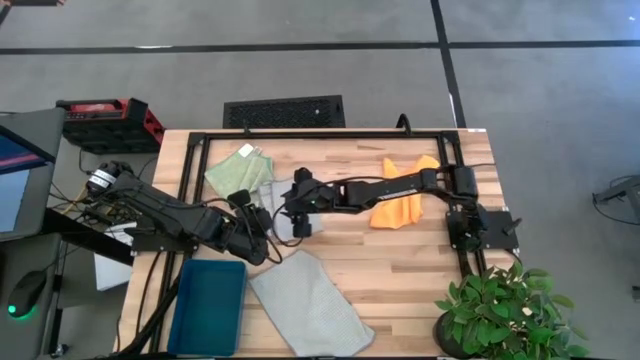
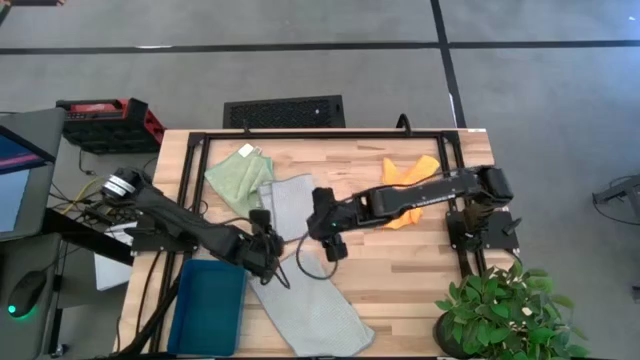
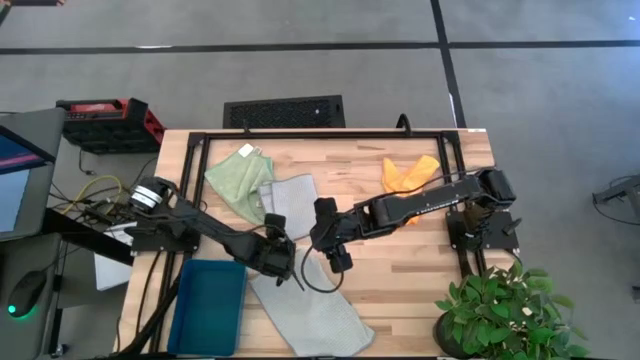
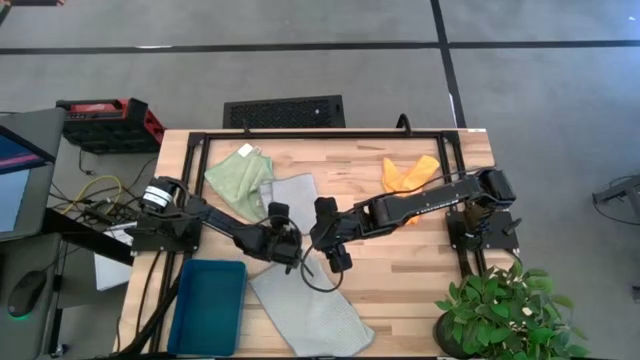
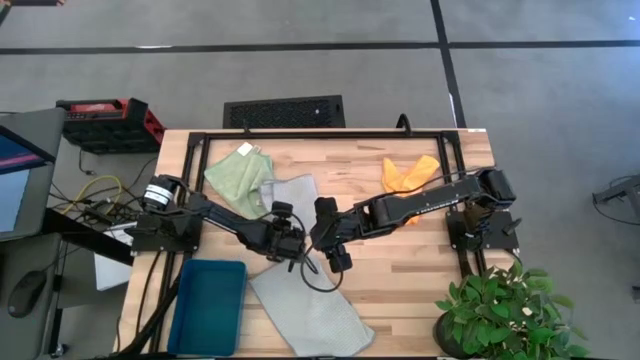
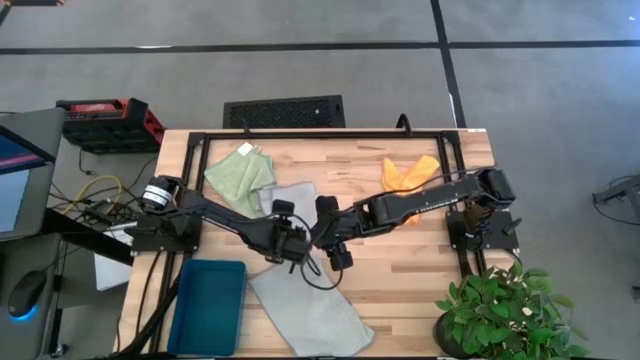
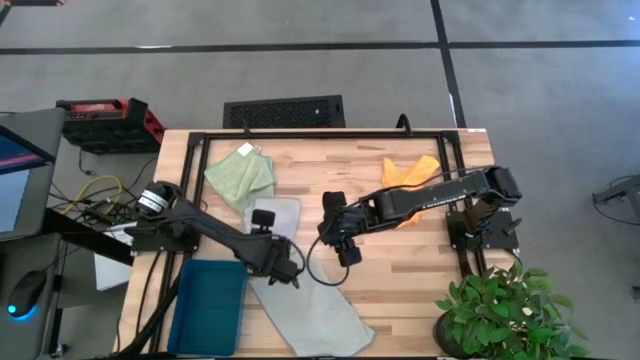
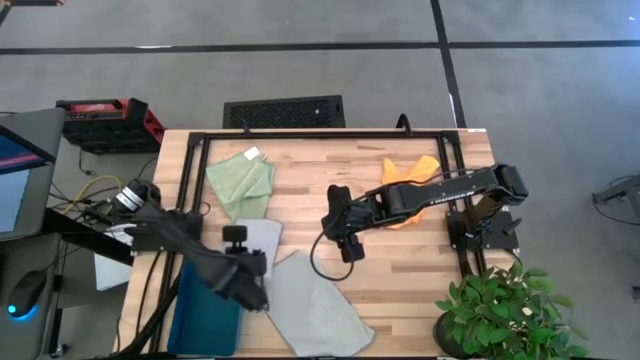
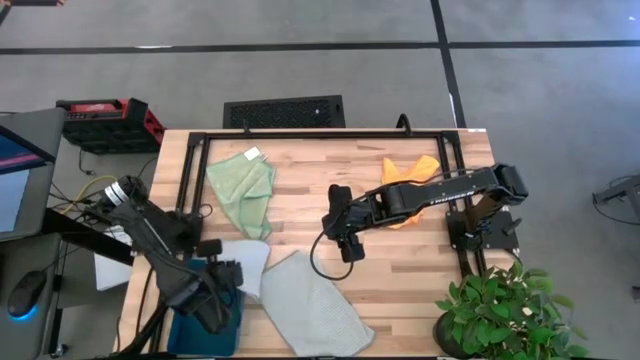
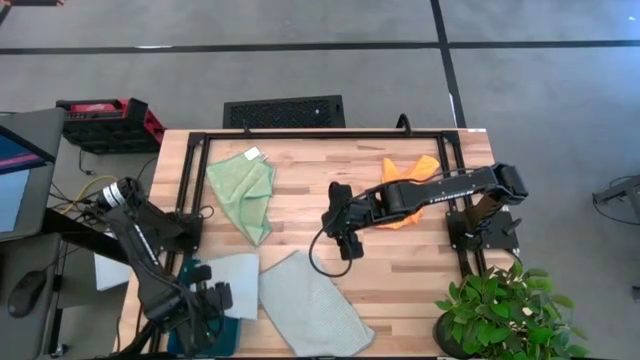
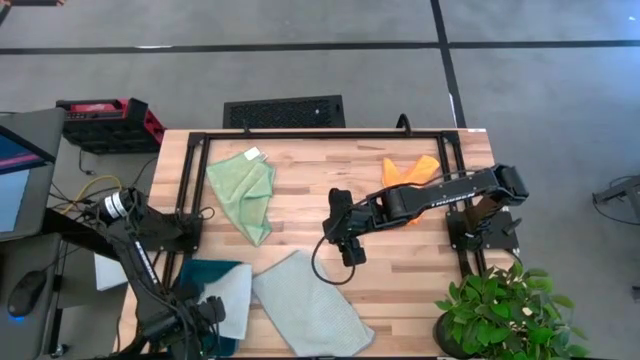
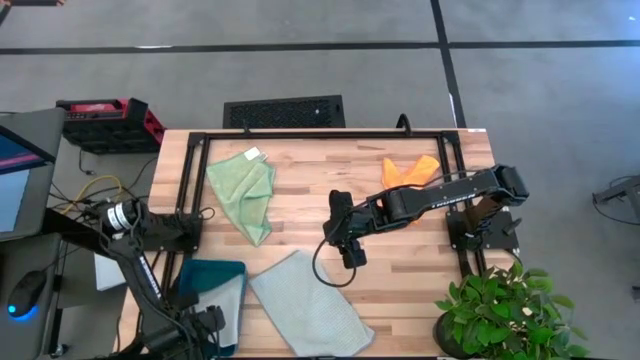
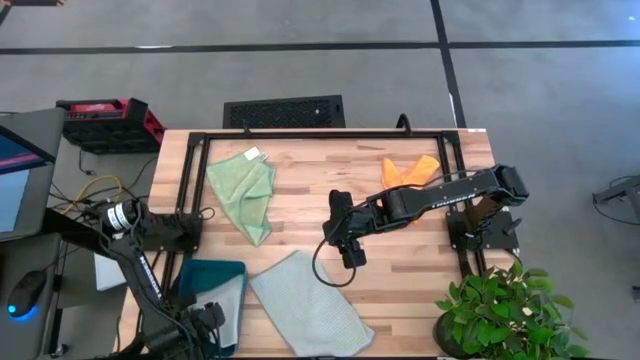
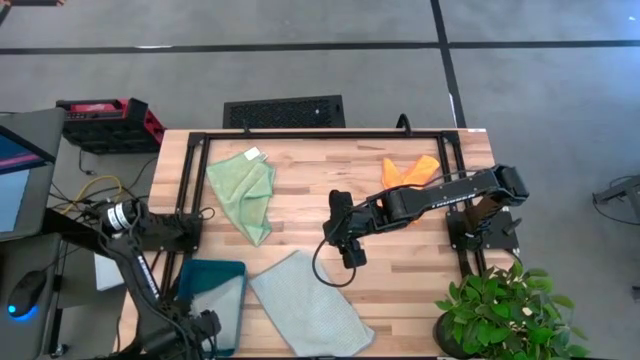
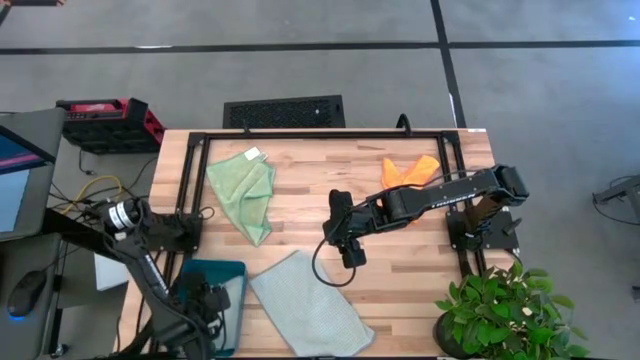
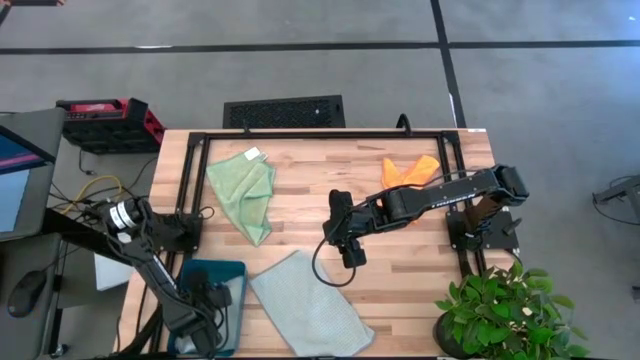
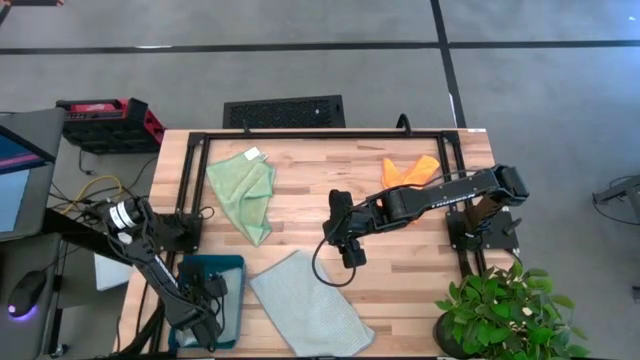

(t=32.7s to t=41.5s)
Task: Fold microfiber towels
Put the folded gray microfiber towel into the blue bin

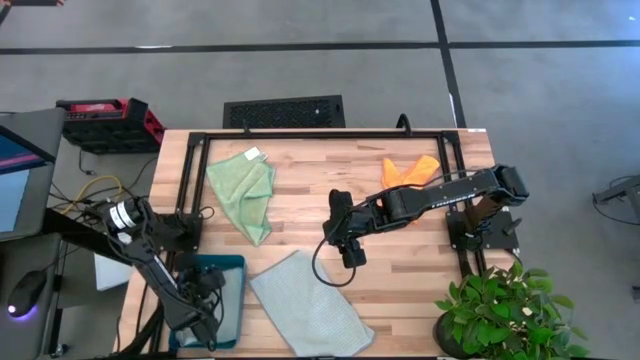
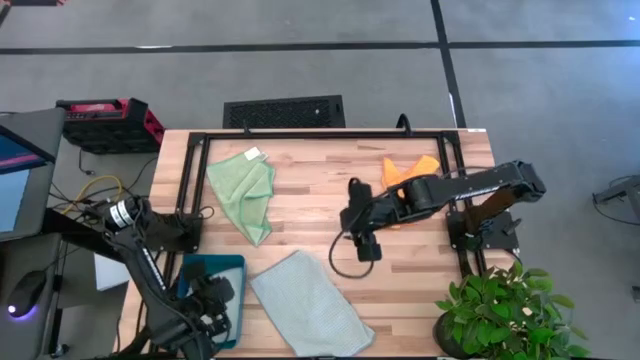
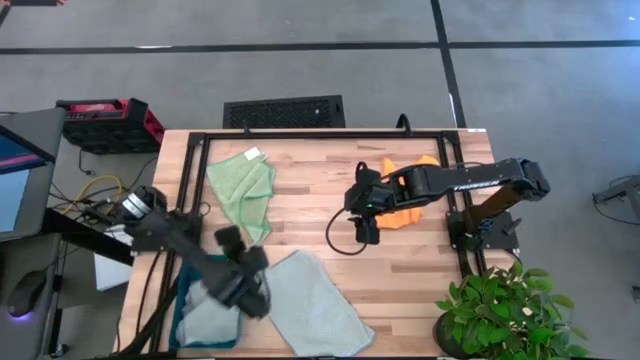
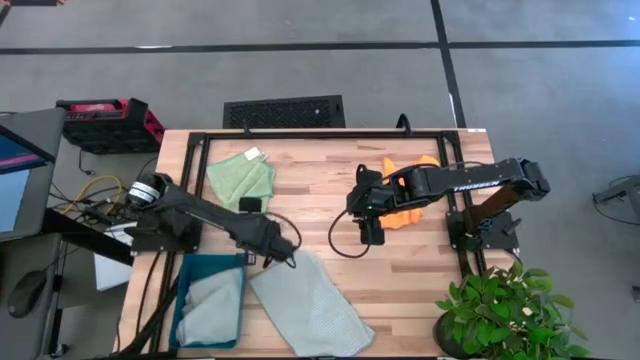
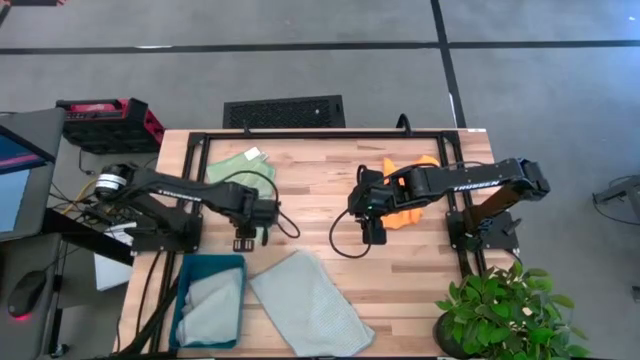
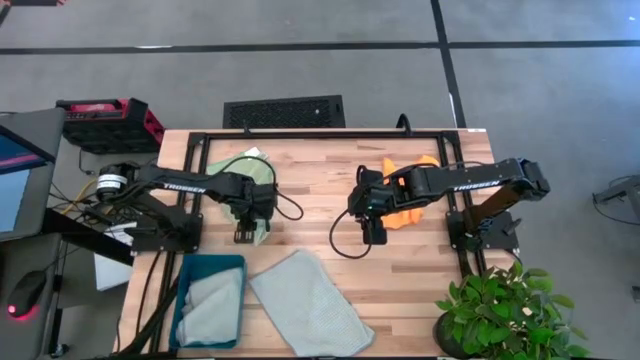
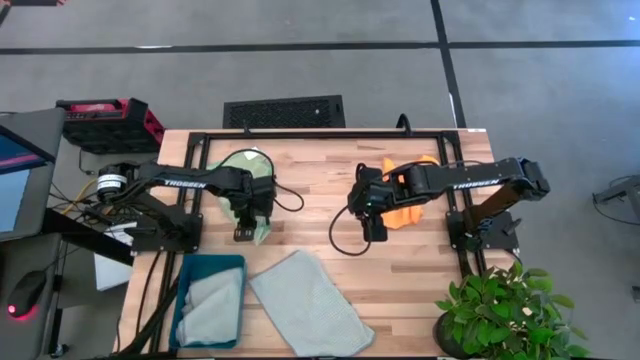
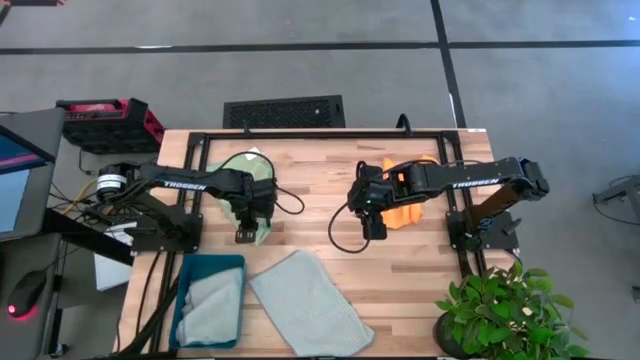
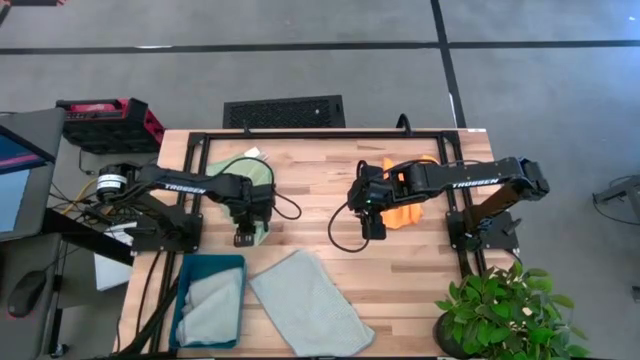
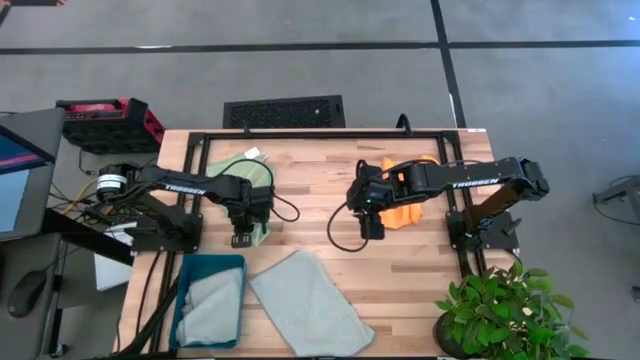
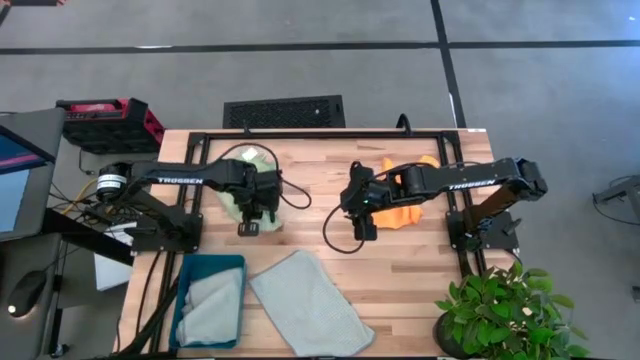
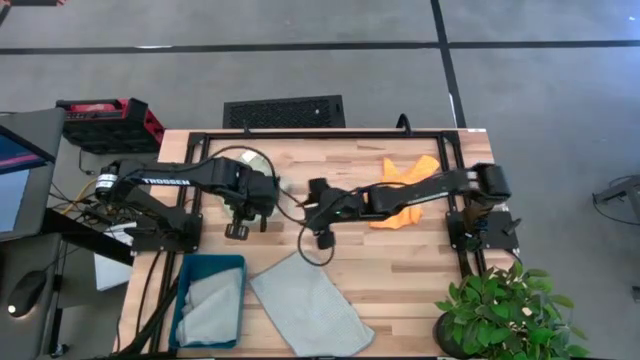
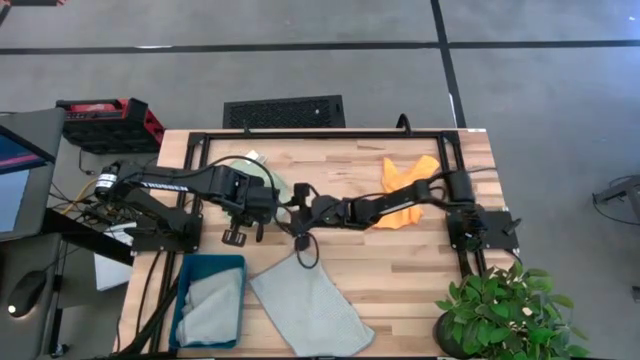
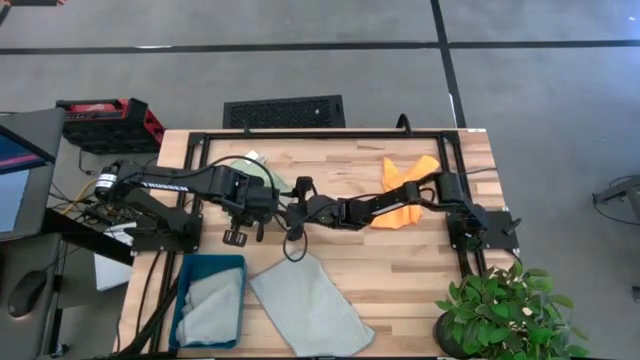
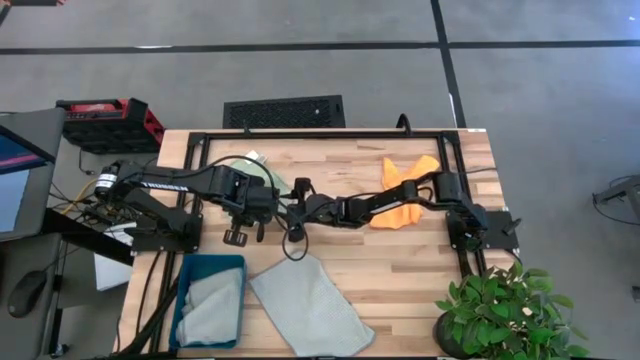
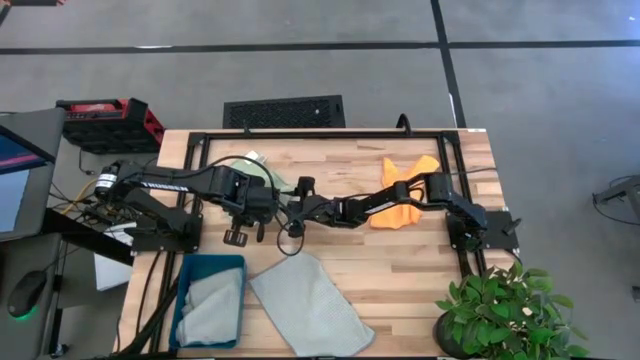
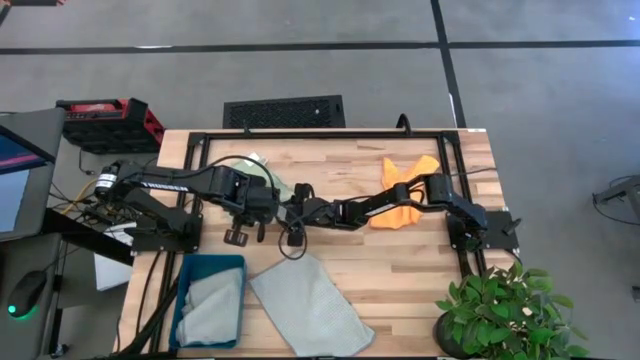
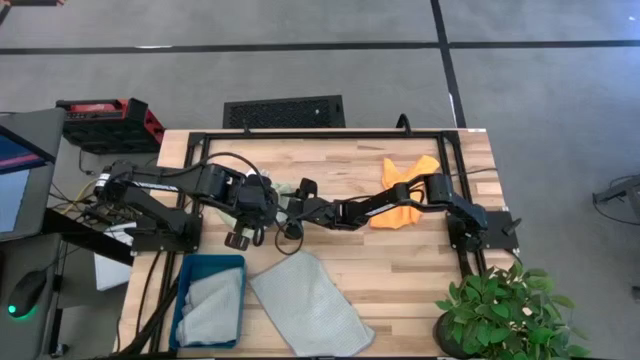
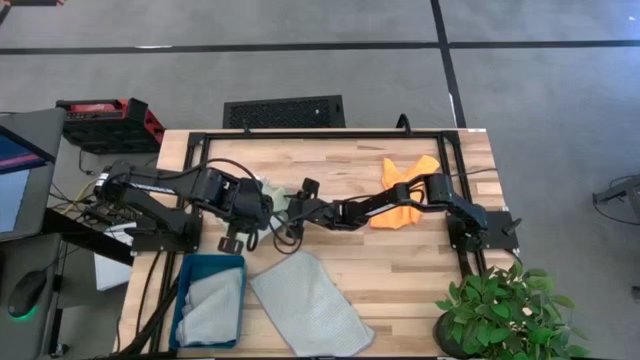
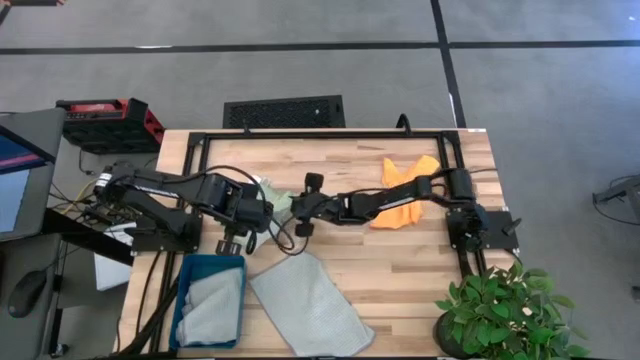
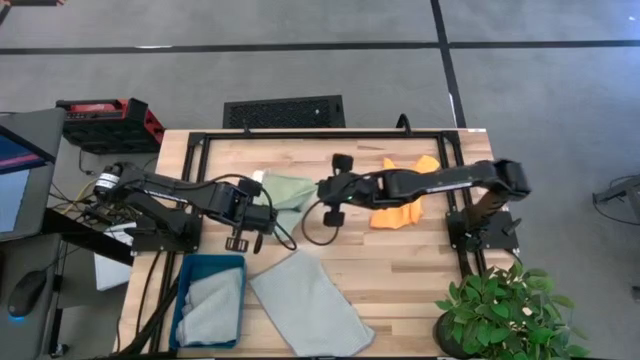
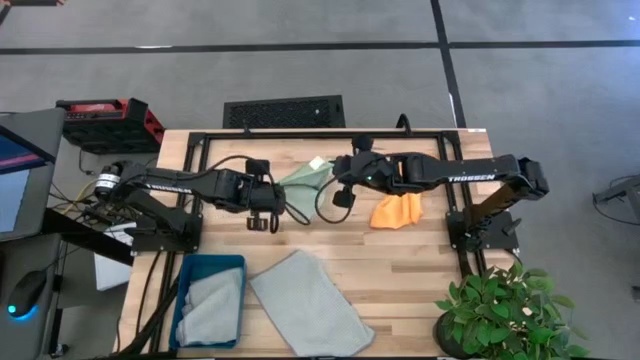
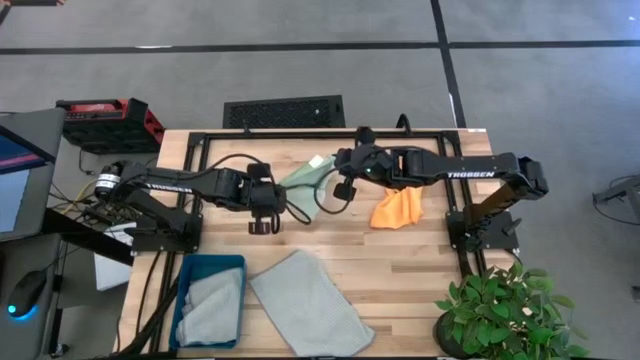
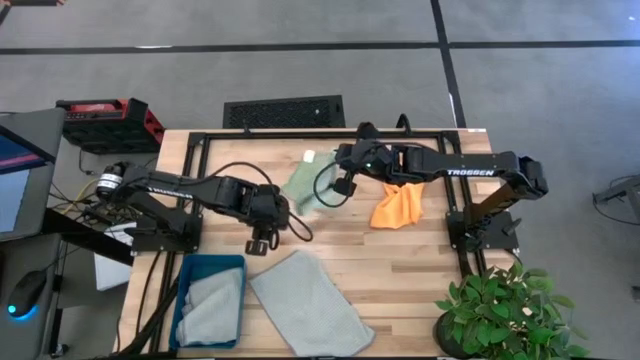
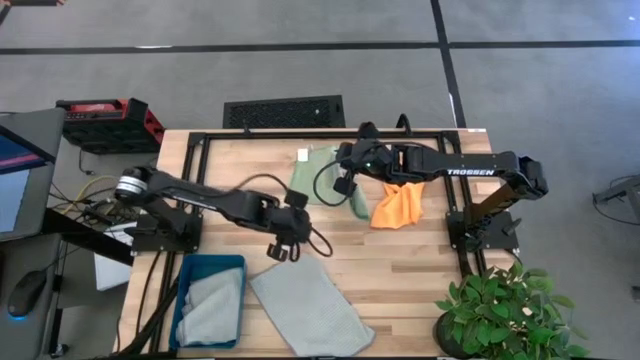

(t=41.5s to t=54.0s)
Fold the green microfiber towel
